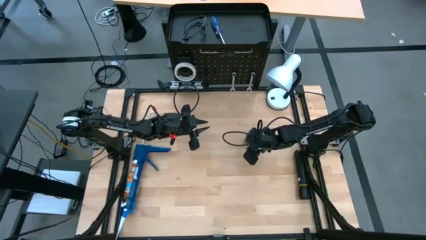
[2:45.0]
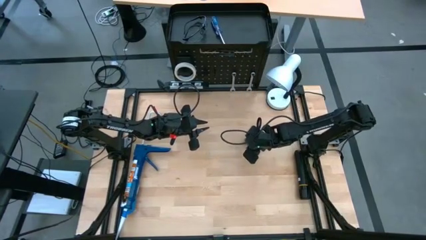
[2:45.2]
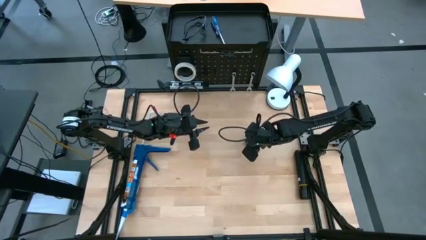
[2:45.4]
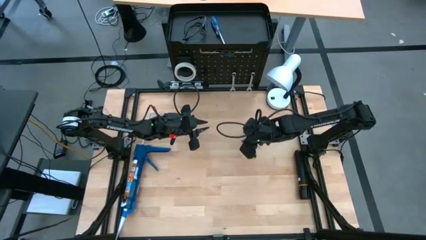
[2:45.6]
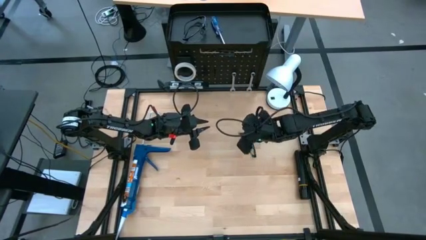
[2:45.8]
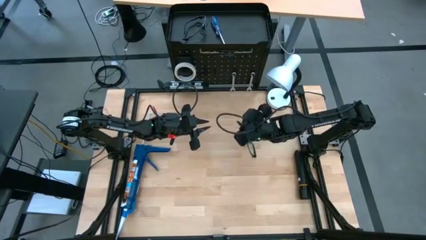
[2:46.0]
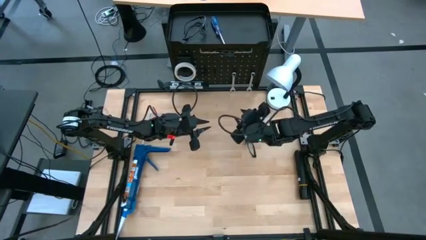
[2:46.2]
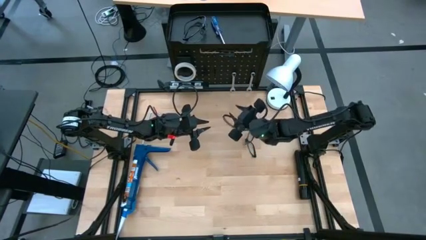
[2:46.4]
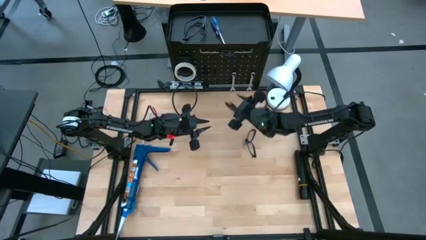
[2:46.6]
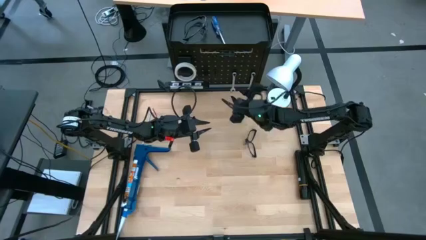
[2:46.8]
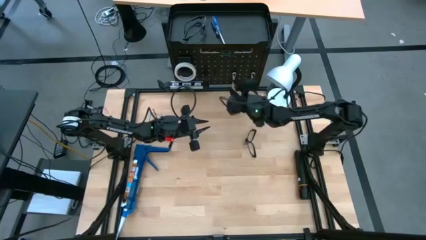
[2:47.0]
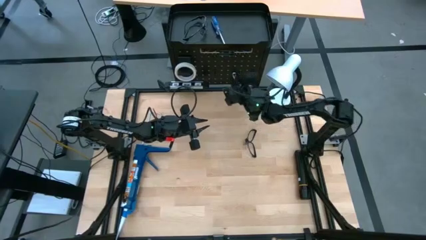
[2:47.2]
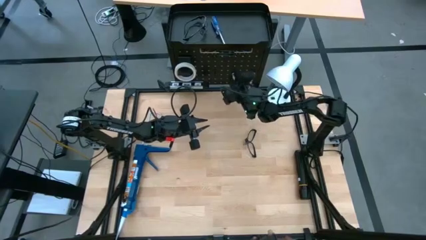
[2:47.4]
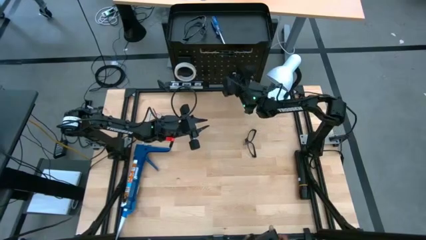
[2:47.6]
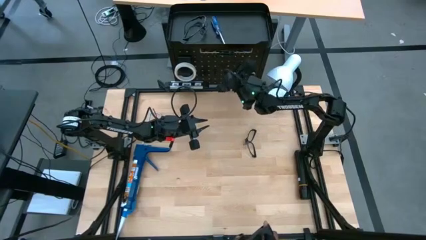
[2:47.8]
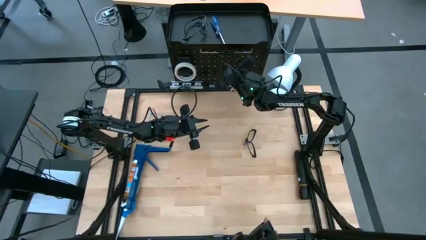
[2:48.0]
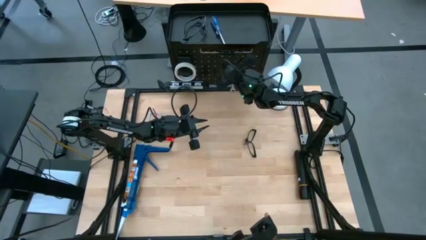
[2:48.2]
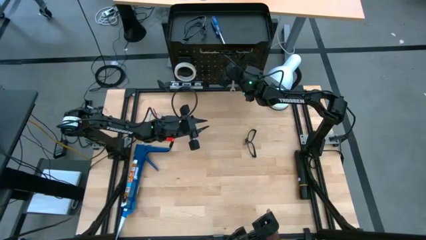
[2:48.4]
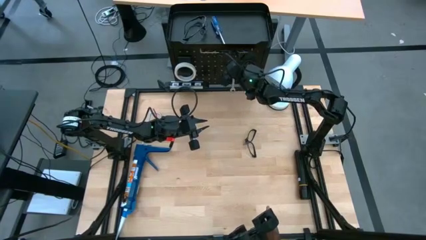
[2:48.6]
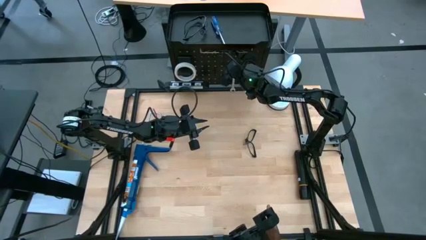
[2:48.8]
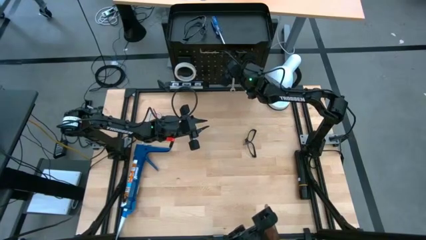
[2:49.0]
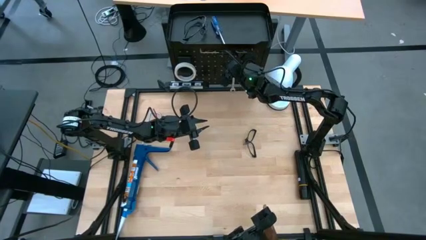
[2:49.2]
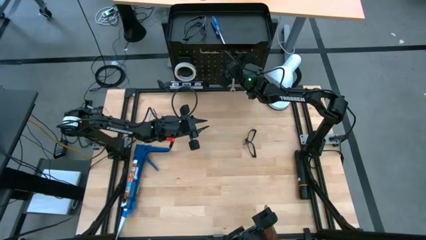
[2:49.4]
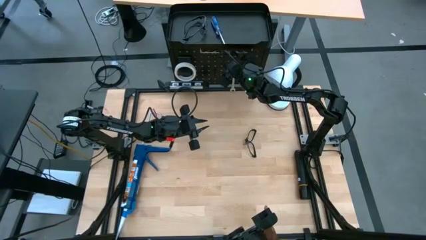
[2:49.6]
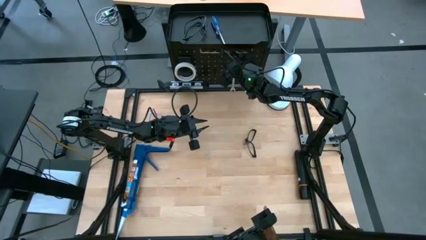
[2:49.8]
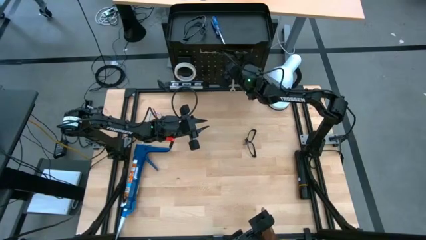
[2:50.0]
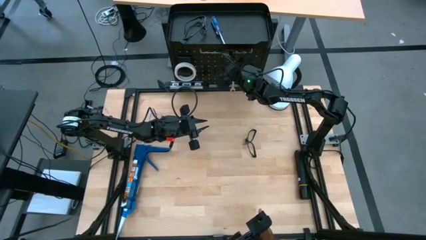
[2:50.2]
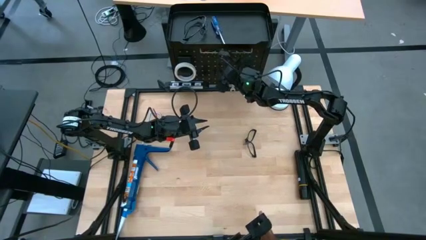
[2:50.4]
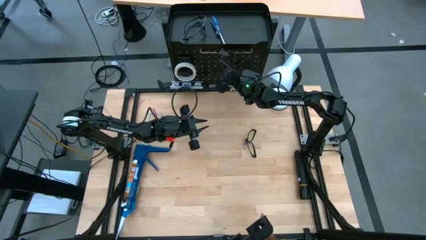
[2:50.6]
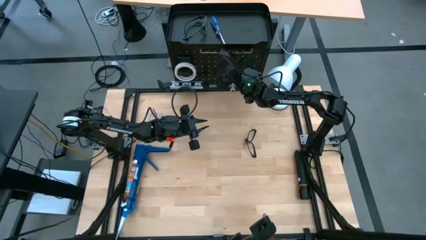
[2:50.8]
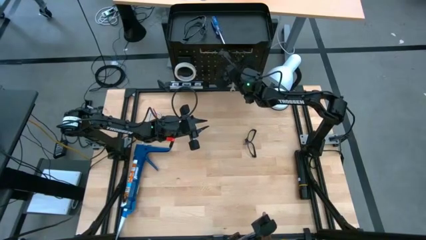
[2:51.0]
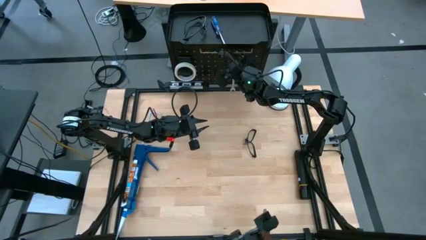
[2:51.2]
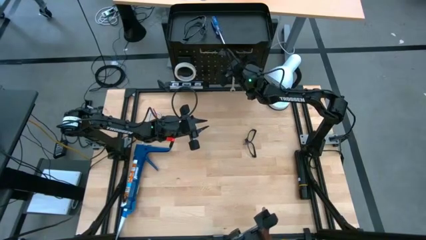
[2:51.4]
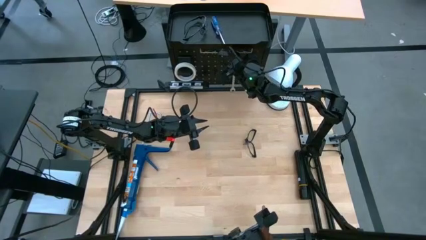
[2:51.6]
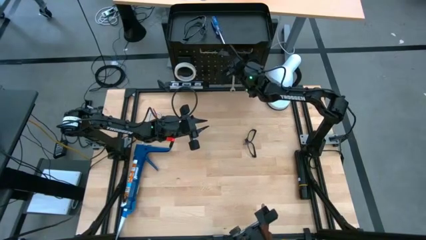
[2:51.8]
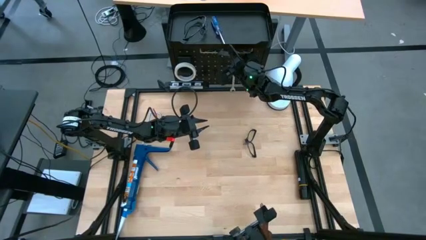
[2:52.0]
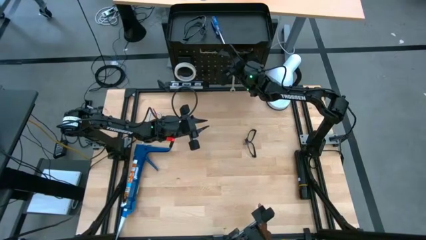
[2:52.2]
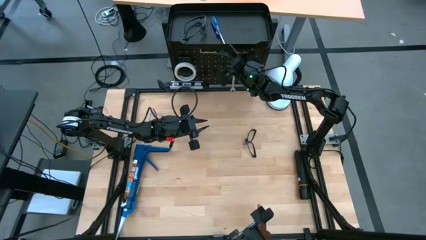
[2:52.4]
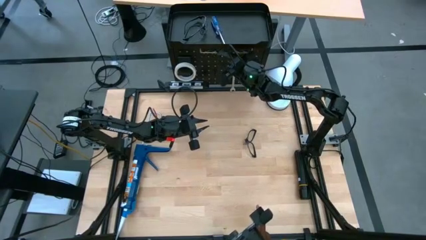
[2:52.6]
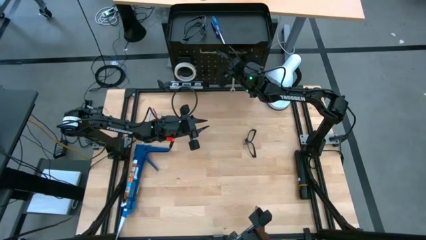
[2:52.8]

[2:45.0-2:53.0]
Task: Hang tools onto peg board
Unhang the rectangular tool from the peg board

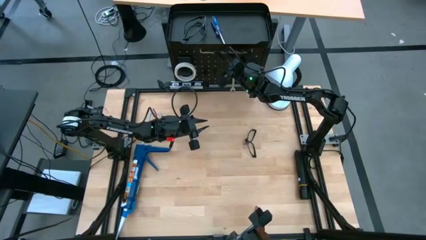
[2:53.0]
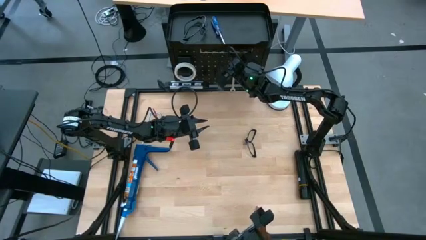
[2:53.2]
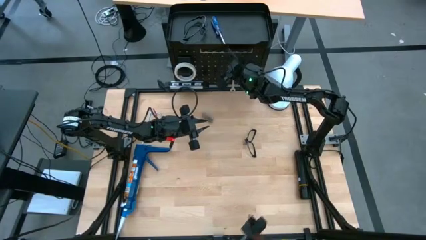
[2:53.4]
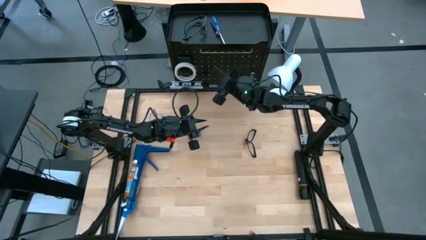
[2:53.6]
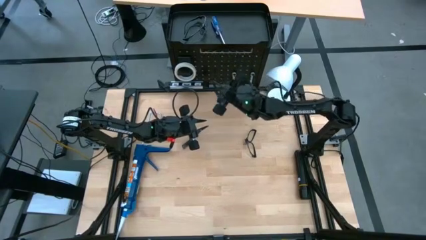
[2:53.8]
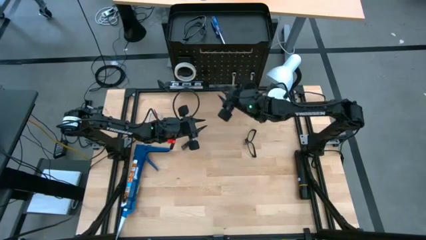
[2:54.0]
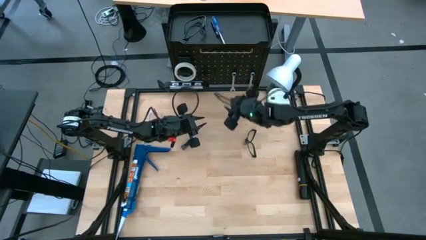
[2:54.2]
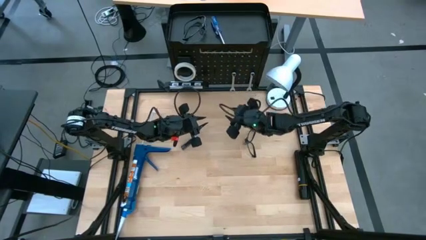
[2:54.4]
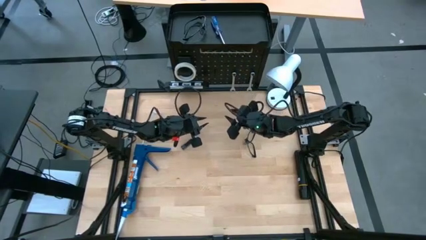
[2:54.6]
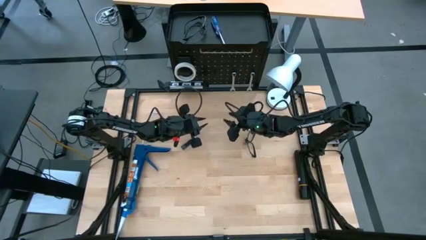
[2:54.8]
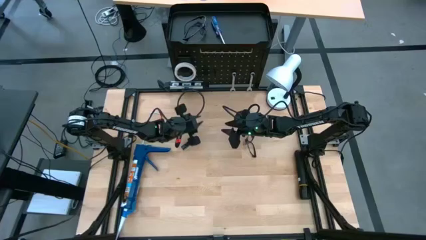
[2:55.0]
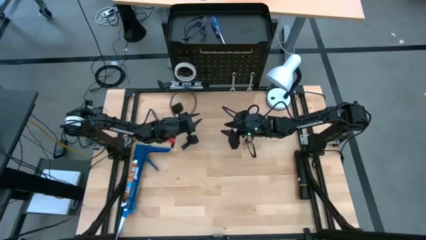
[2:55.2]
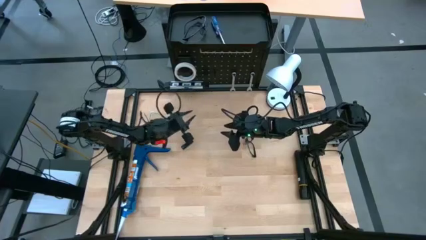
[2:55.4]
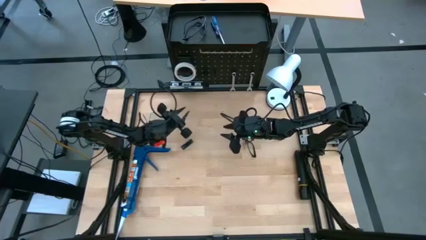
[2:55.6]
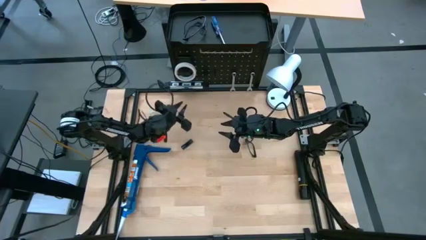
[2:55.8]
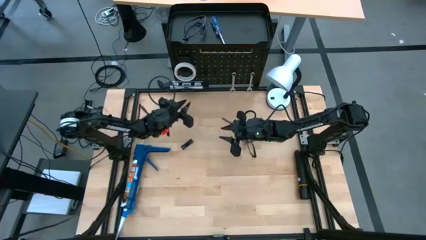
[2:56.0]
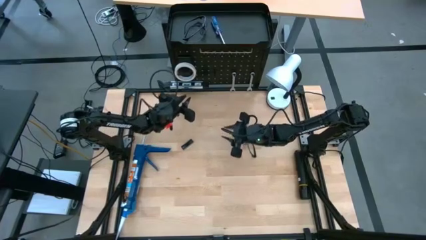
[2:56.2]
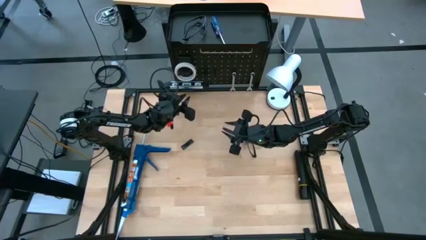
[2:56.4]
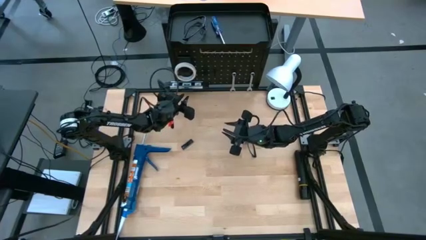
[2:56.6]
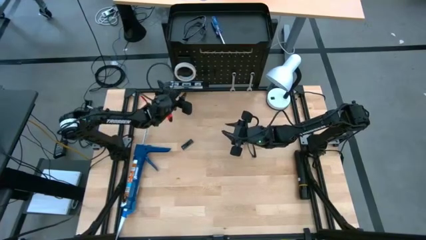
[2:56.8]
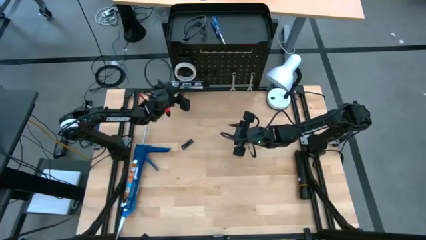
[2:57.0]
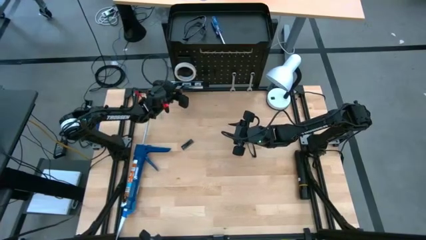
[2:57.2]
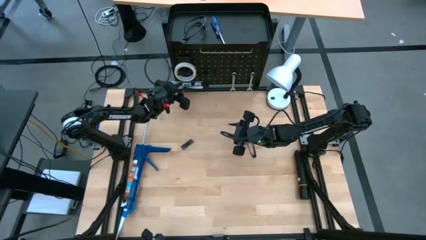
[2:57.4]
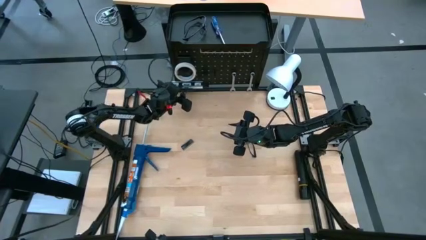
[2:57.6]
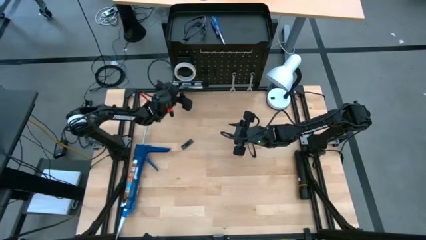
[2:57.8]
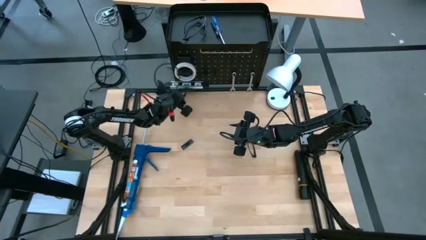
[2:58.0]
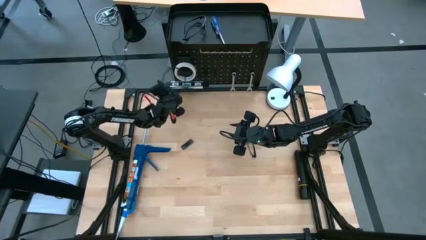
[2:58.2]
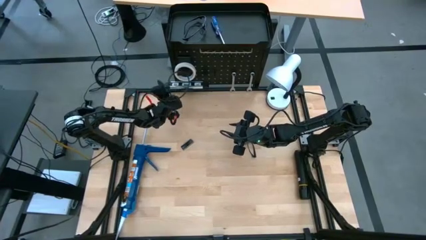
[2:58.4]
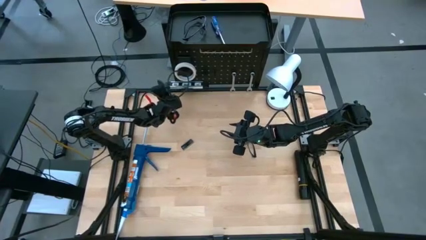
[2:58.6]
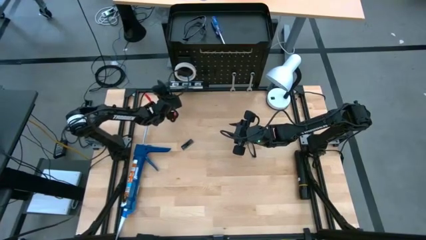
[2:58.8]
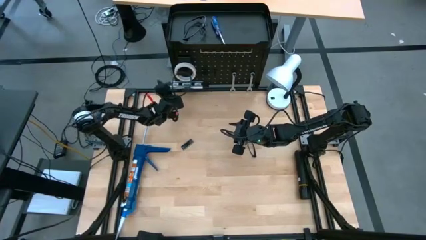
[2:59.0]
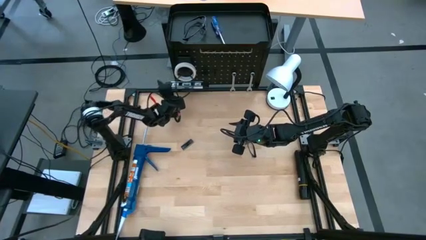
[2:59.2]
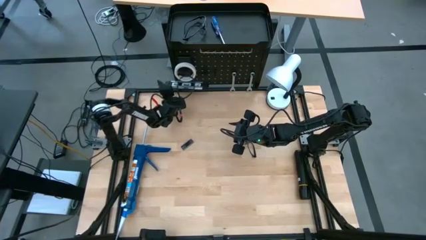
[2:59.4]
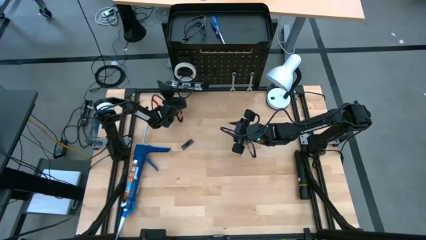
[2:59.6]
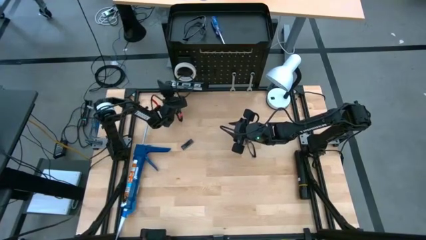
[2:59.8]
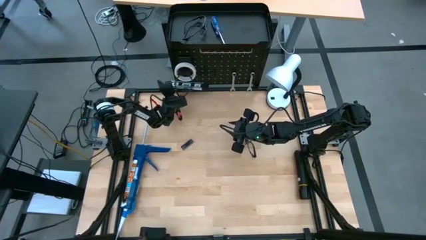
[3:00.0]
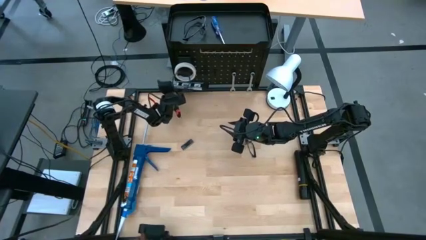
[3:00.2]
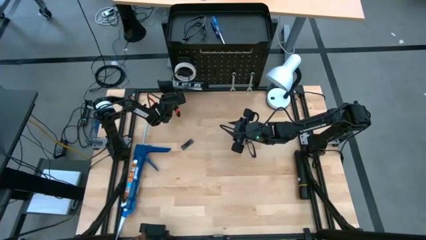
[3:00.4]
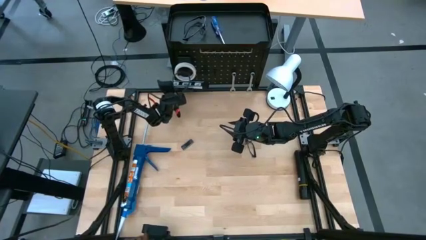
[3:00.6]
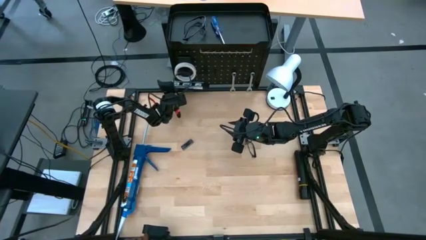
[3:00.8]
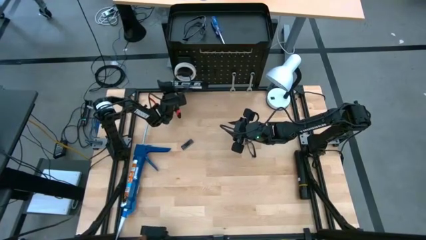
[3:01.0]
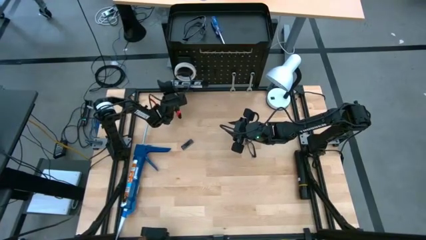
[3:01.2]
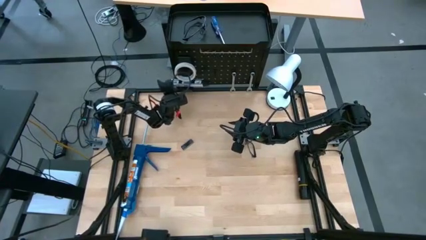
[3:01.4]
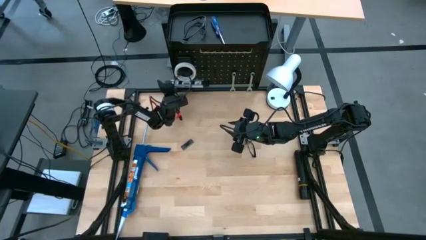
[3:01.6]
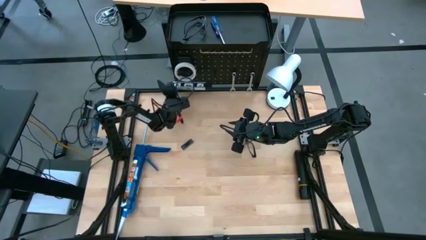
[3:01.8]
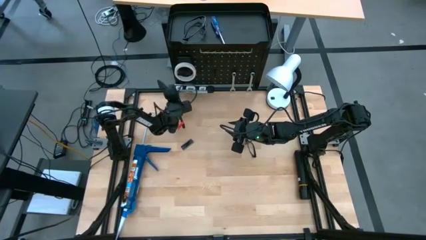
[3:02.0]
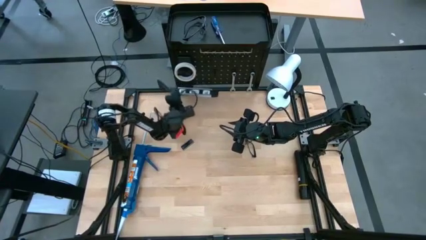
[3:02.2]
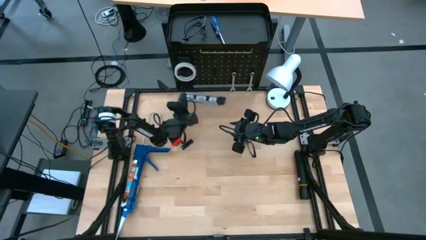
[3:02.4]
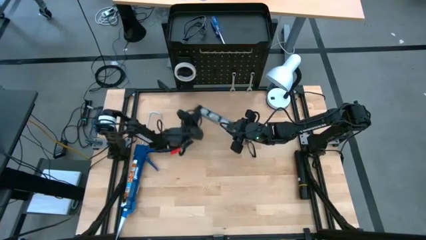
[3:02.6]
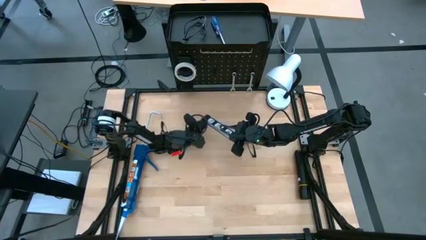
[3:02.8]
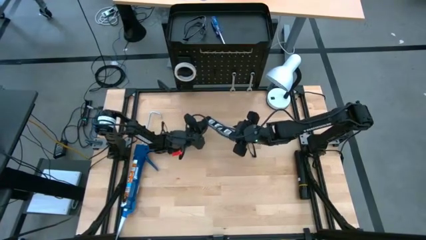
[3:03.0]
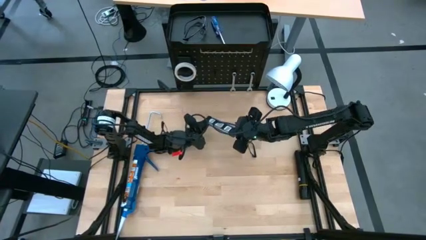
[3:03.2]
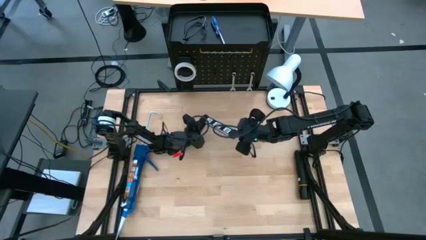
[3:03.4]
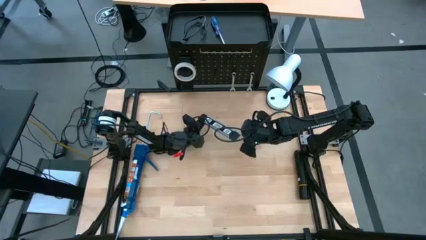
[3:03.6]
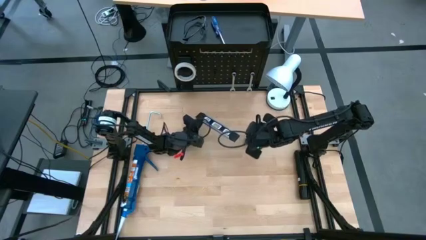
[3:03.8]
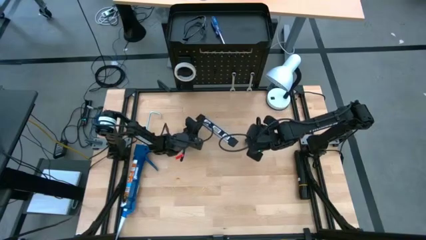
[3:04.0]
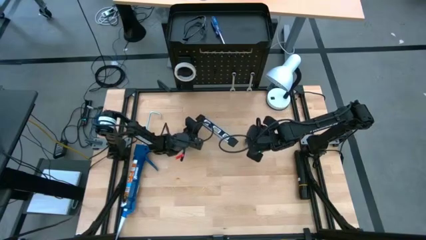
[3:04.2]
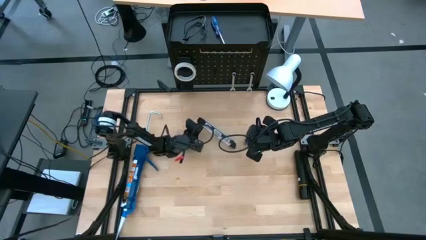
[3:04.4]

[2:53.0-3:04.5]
Unhang the spirit level from the peg board
